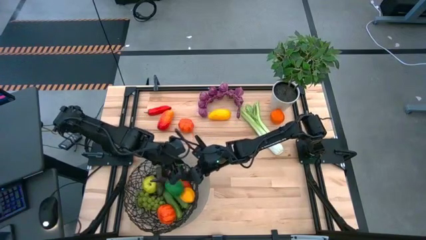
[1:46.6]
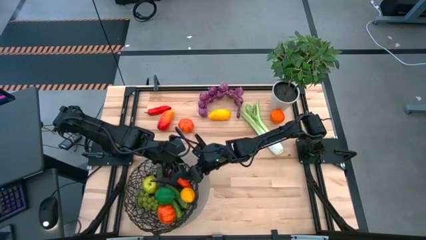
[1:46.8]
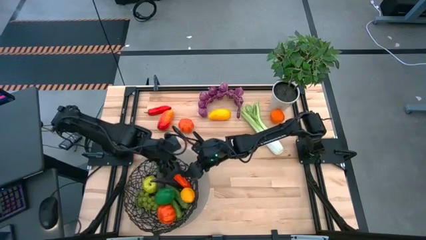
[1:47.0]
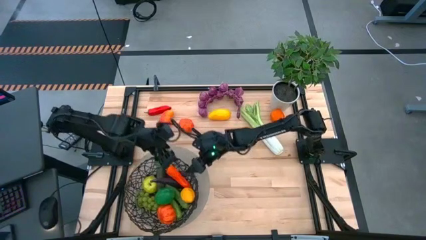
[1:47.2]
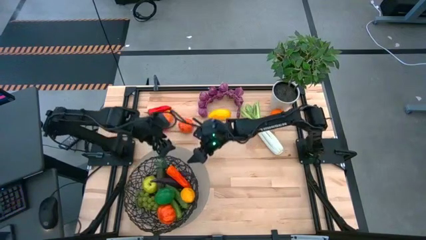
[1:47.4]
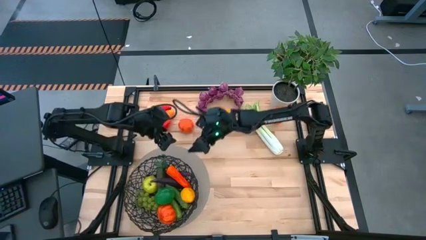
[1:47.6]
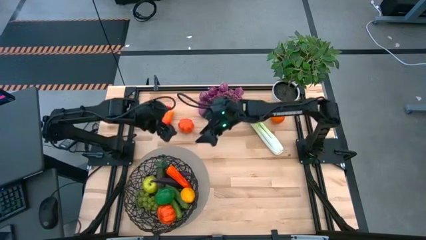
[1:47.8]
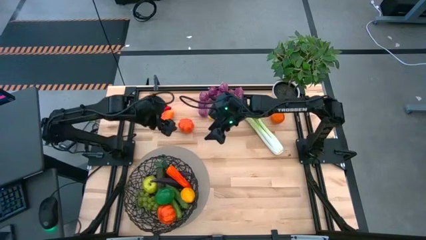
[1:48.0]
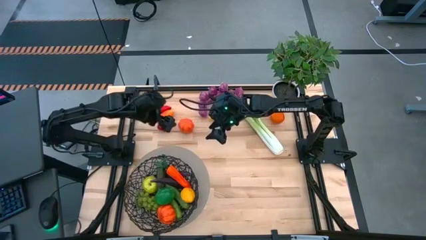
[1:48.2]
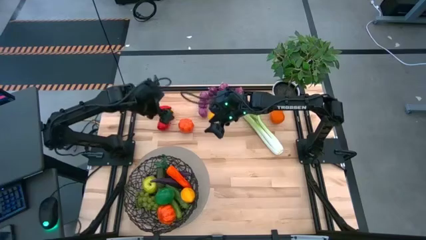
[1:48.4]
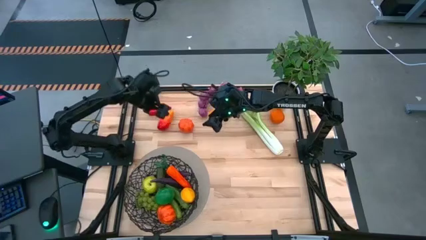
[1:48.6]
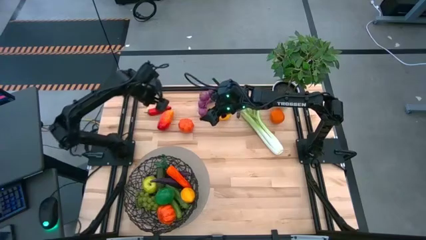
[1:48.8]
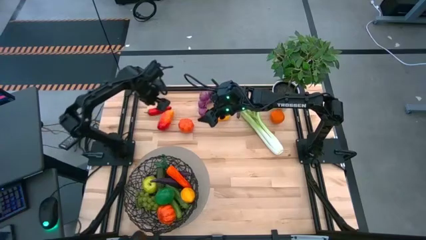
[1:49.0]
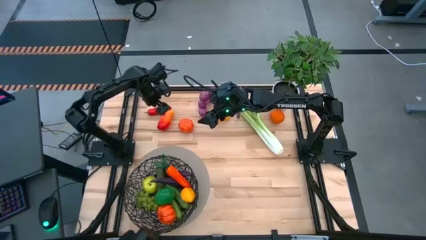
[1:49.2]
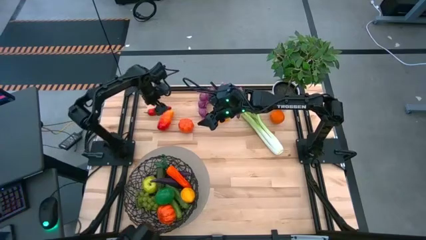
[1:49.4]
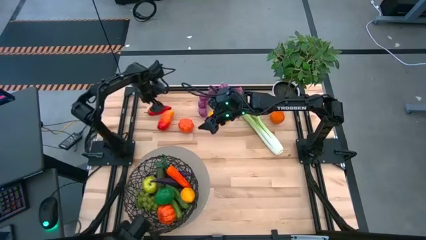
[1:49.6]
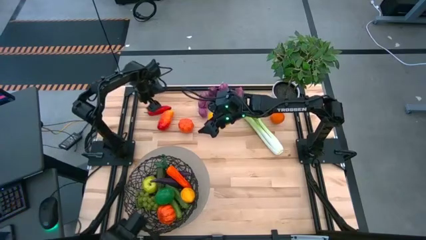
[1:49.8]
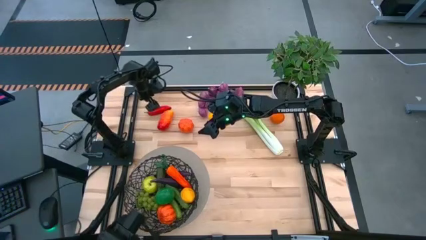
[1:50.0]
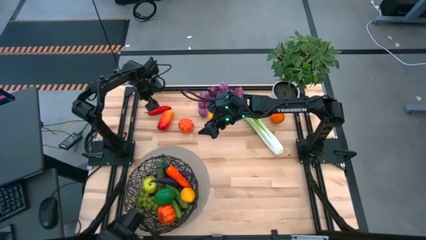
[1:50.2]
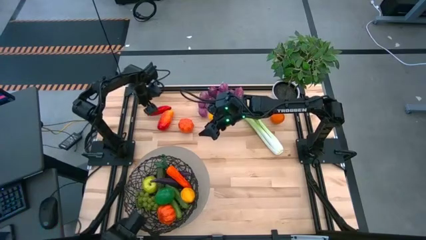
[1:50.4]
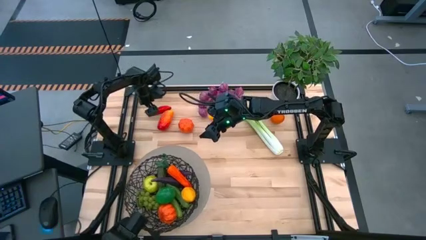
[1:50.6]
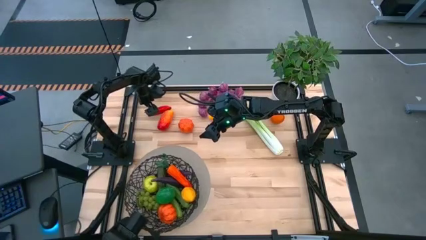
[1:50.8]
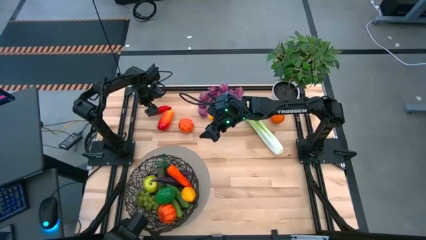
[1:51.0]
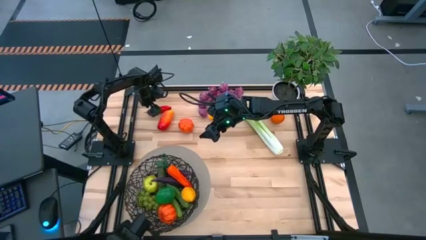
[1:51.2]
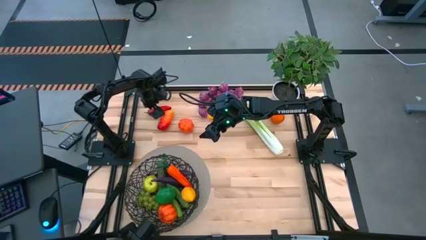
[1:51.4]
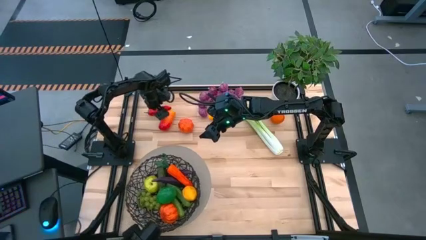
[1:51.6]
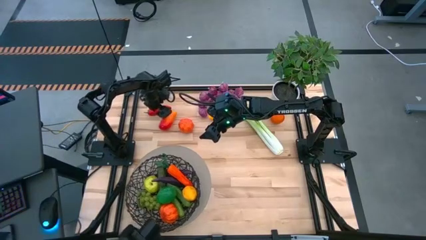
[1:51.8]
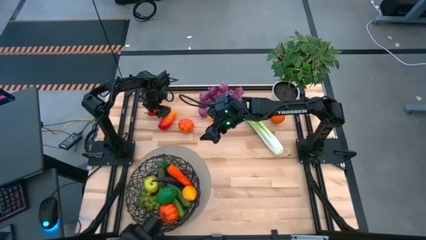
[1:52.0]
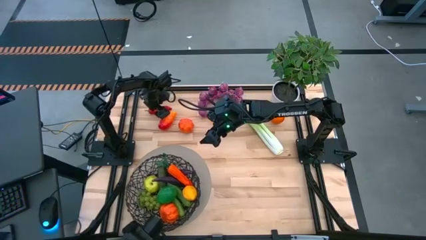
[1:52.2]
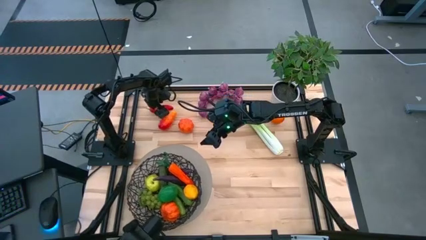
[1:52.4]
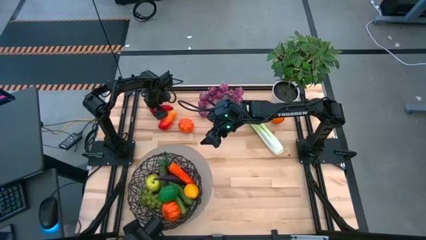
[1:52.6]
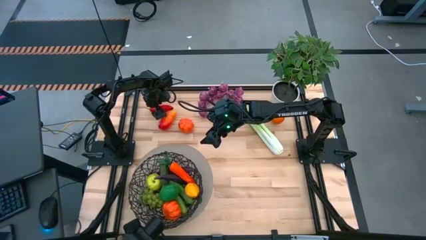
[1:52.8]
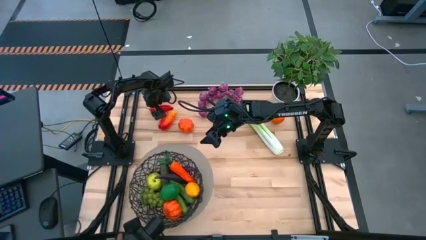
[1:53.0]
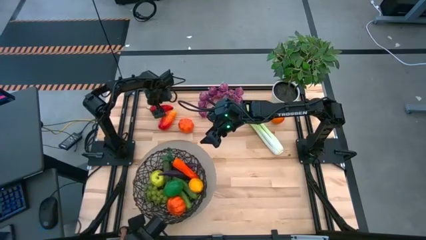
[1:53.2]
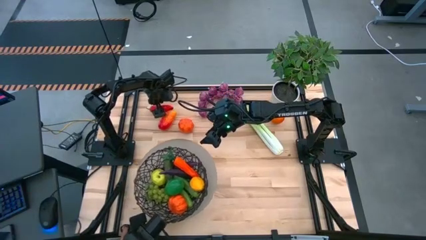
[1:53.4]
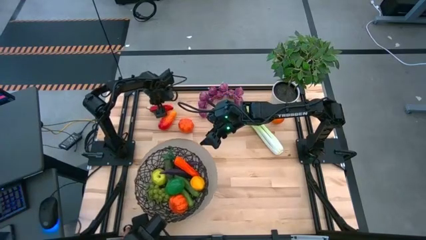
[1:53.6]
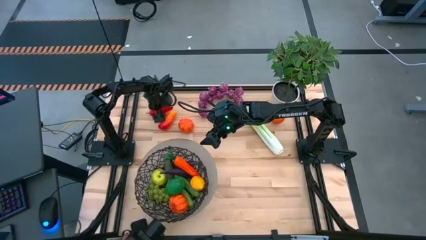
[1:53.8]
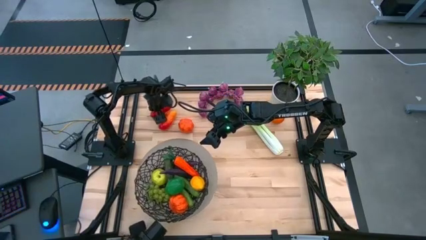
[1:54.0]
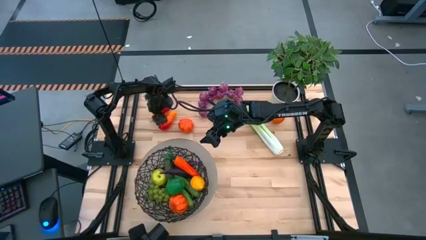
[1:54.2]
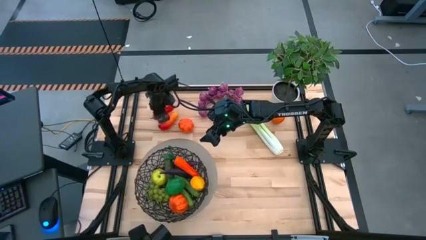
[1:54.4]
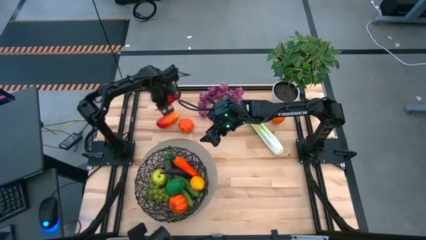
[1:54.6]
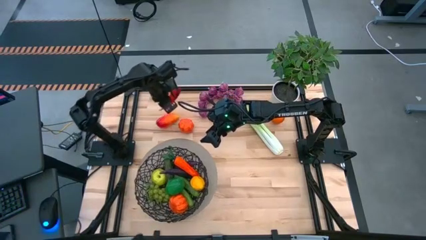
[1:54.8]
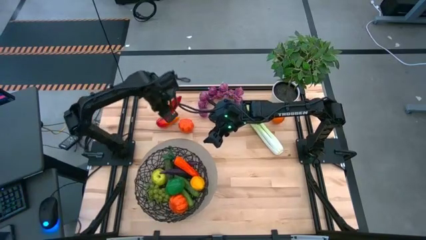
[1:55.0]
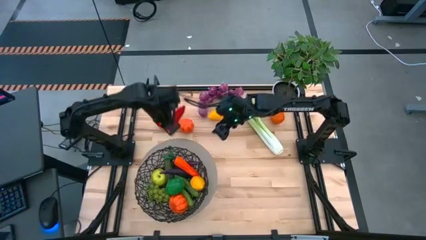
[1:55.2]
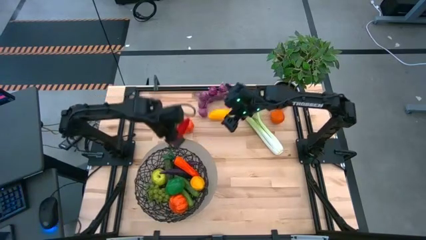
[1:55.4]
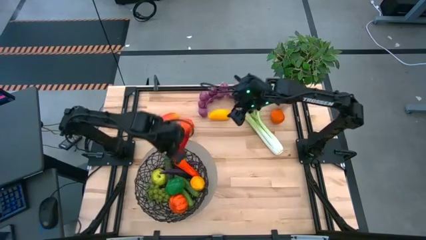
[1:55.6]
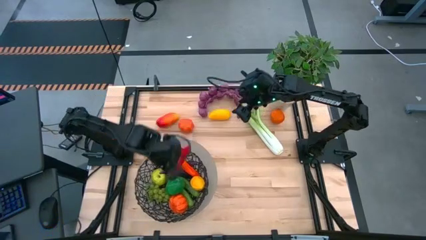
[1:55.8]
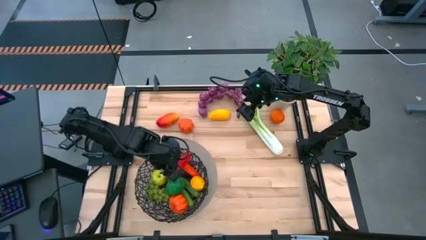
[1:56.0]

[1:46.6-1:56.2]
Task: Build produce basket
Put the red chili pepper into the black basket

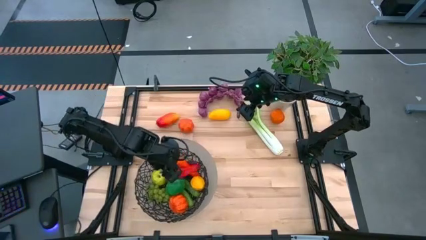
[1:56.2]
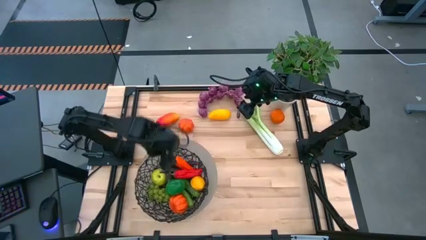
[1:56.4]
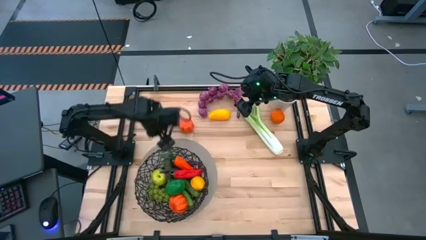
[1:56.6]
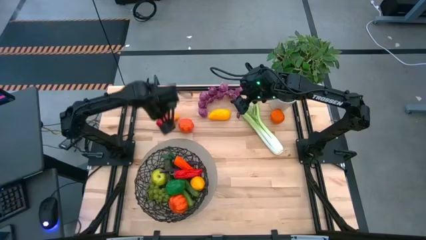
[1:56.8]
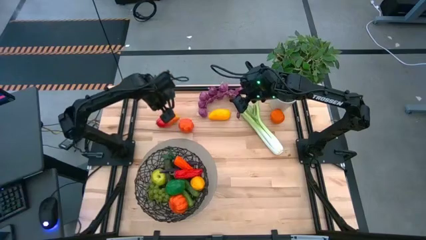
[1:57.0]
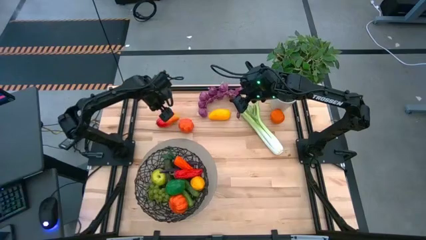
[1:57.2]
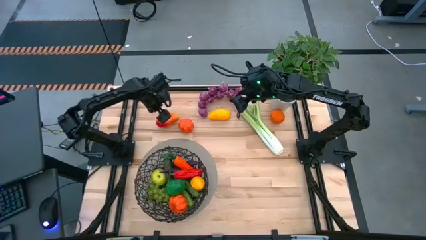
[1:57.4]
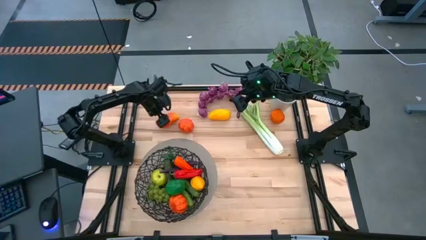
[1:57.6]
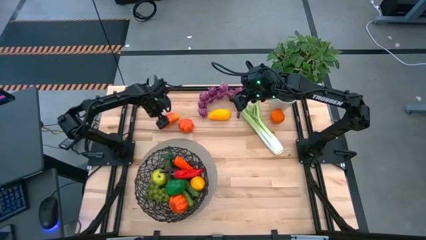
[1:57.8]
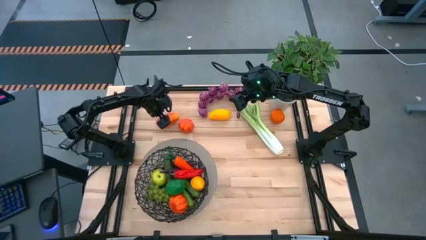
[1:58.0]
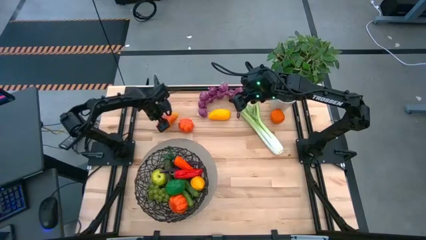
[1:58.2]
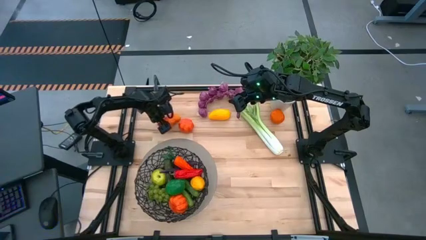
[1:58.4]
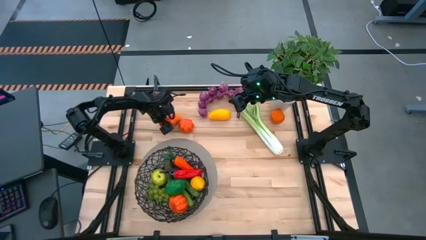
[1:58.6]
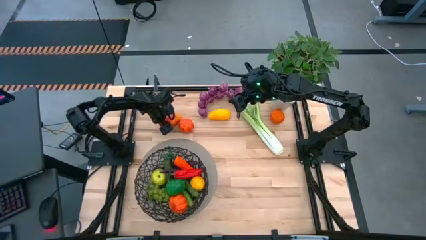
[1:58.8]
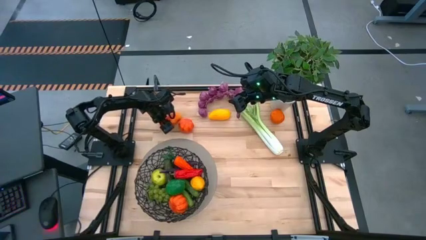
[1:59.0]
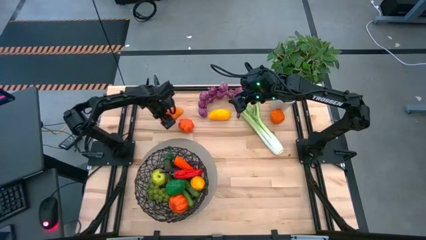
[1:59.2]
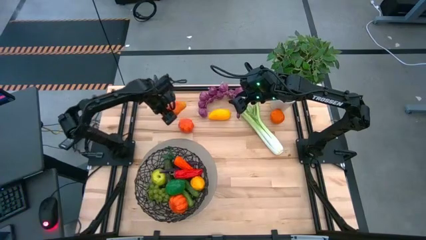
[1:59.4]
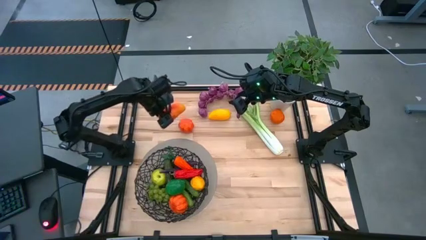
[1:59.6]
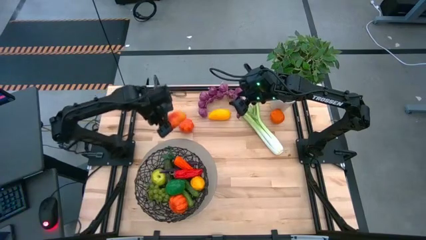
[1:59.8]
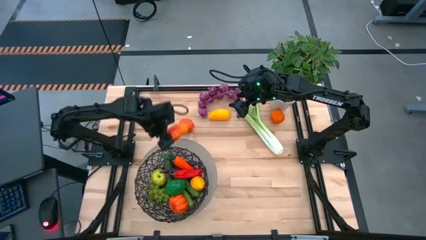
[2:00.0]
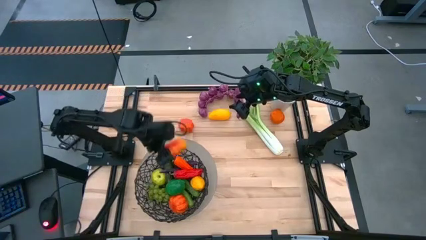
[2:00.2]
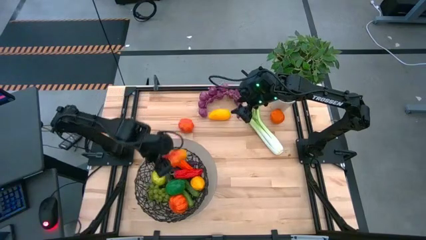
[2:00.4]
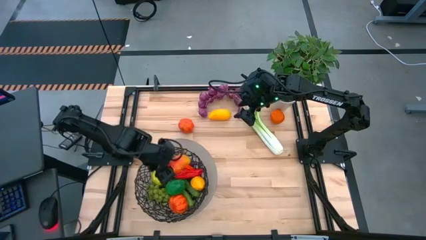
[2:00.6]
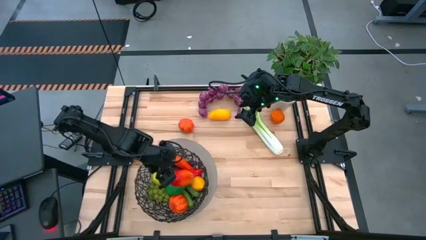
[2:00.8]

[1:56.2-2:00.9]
Put the yellow mango into the black basket

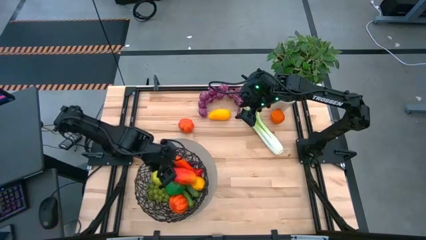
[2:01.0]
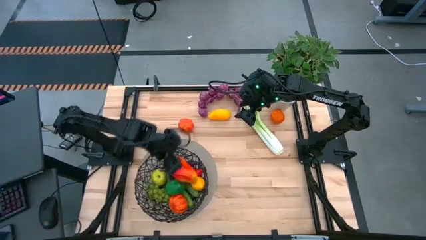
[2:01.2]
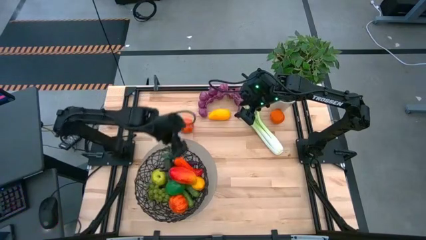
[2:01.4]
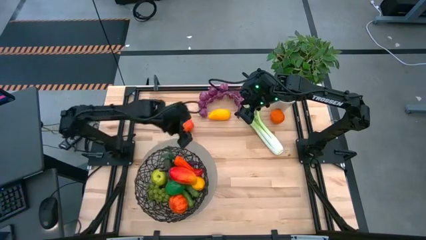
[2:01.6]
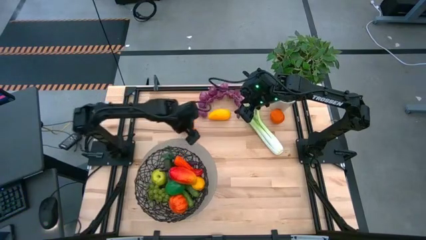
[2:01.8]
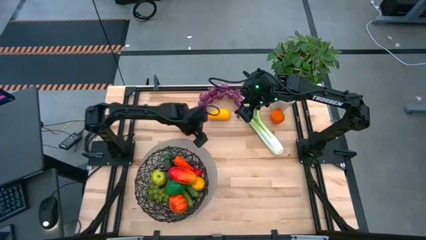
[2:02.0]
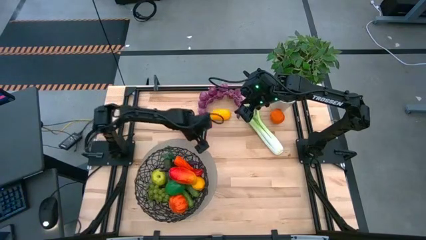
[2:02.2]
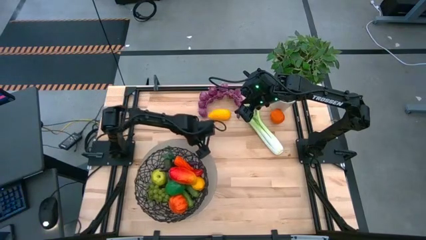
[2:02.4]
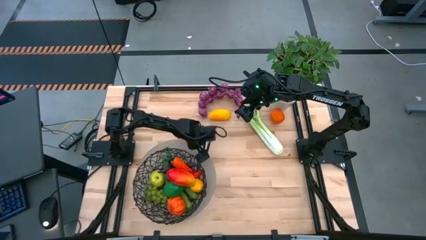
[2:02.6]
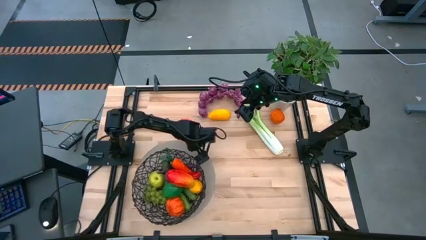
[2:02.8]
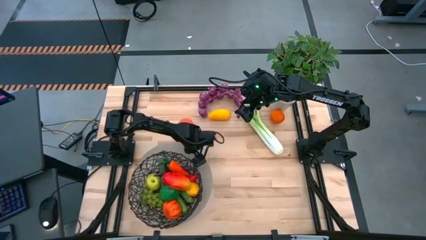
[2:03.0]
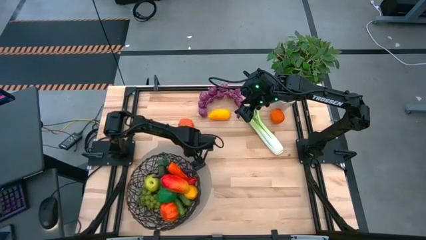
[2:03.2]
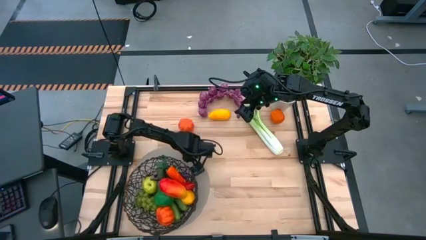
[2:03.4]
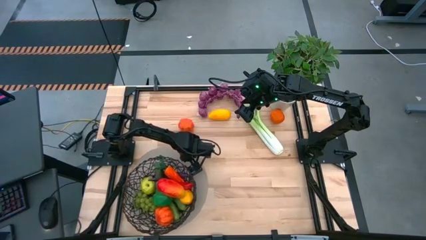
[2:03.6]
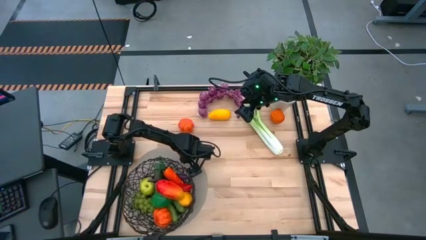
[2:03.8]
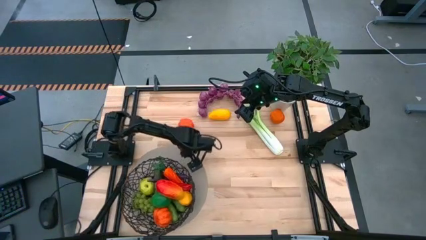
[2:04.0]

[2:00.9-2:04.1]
Adjust the black basket
